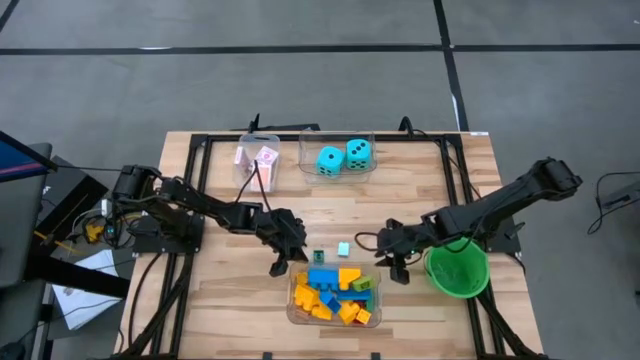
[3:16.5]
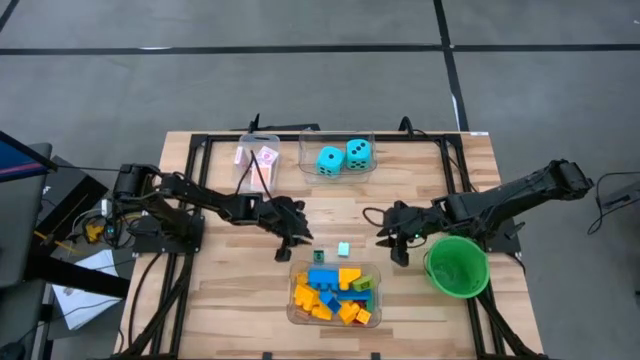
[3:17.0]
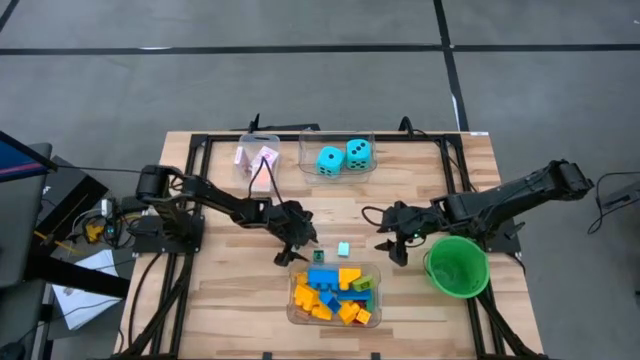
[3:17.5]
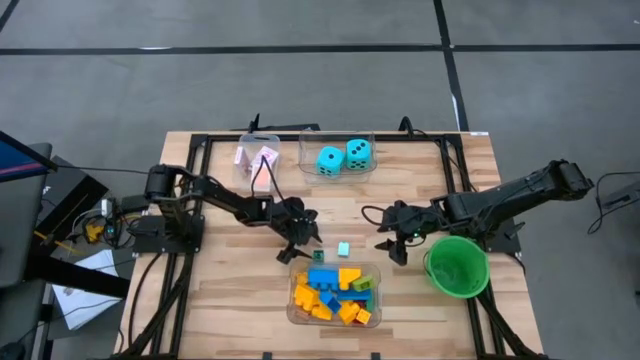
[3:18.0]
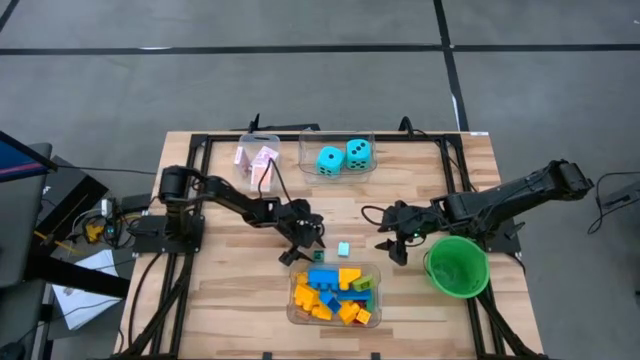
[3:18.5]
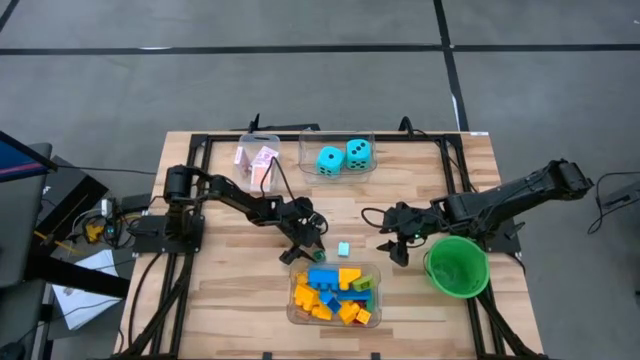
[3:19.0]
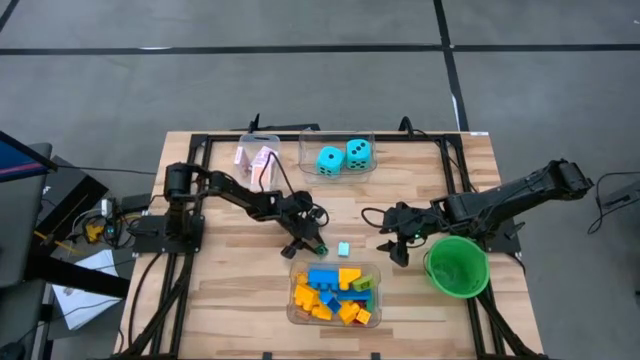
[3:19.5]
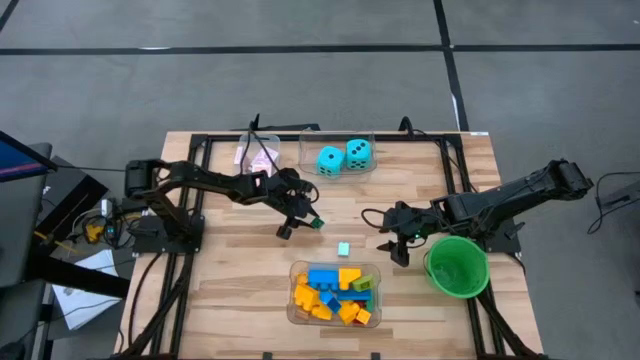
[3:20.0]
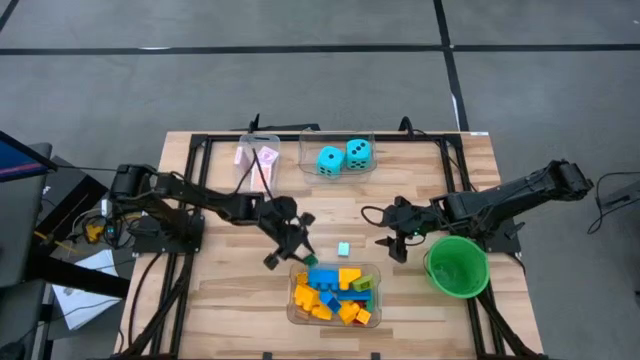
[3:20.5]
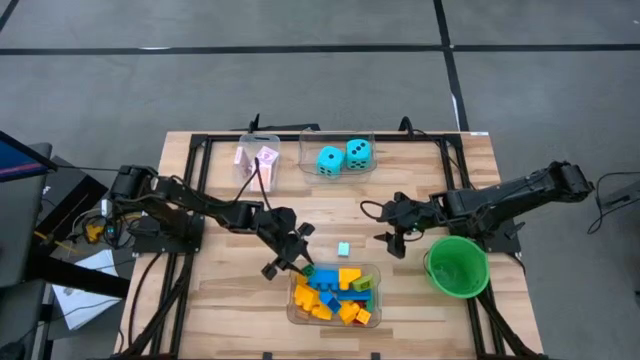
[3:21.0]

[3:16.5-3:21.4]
Task: Pick & Place Toys
Put the green game piece into the bottom transparent bin

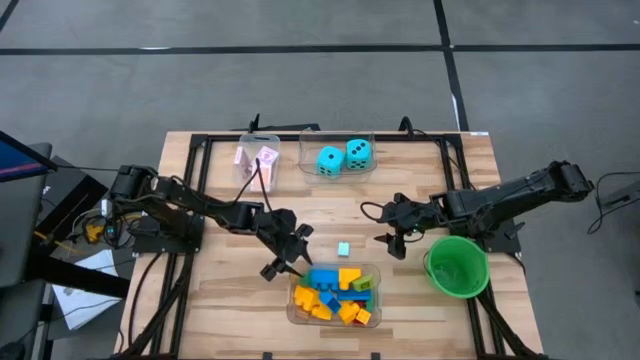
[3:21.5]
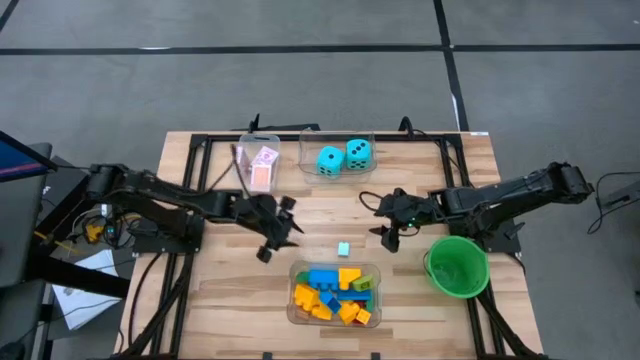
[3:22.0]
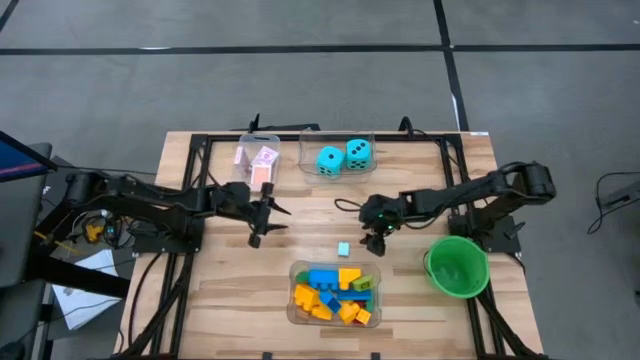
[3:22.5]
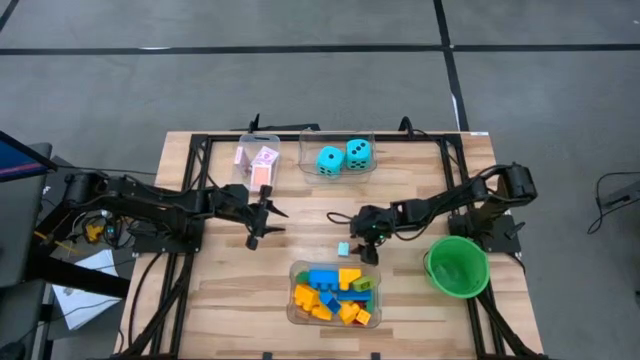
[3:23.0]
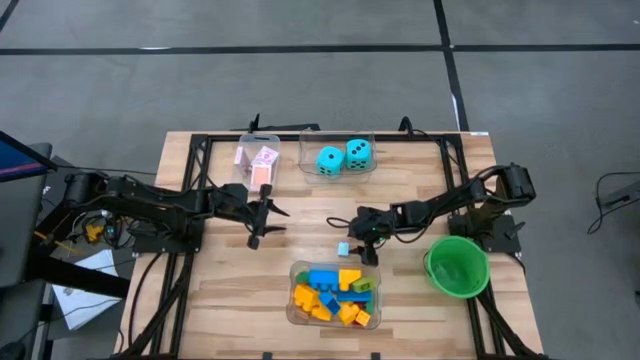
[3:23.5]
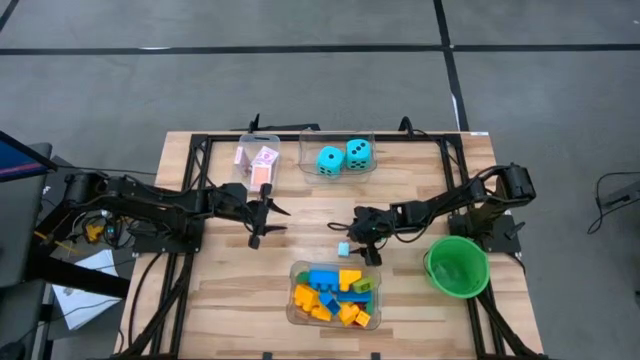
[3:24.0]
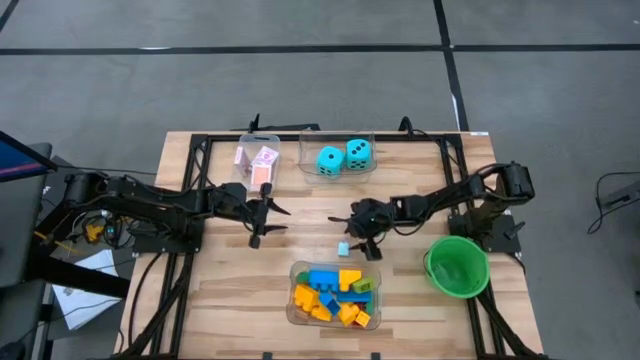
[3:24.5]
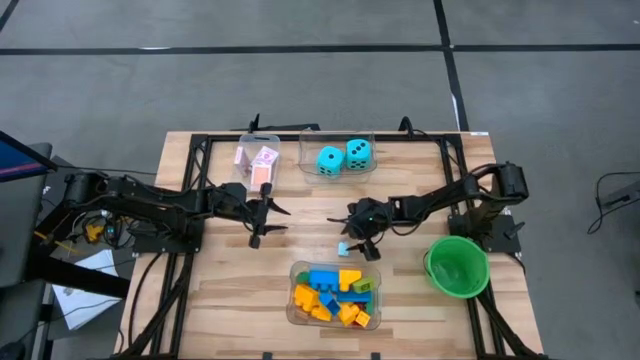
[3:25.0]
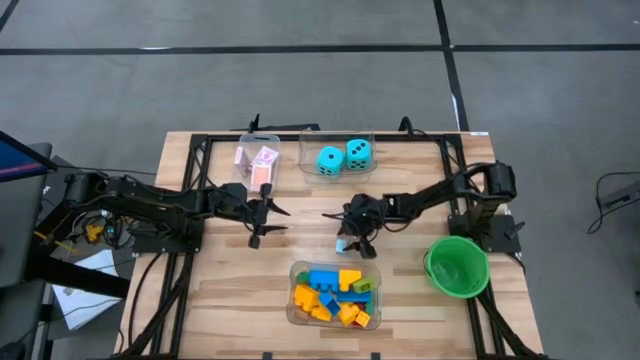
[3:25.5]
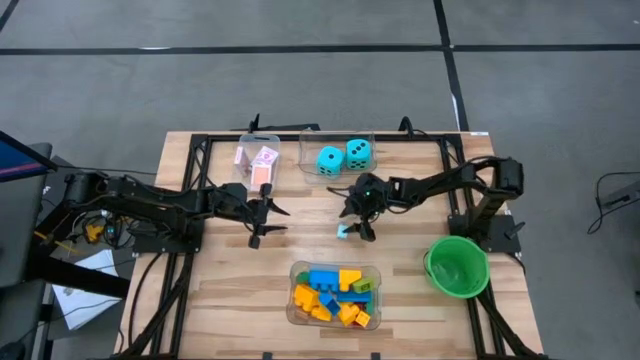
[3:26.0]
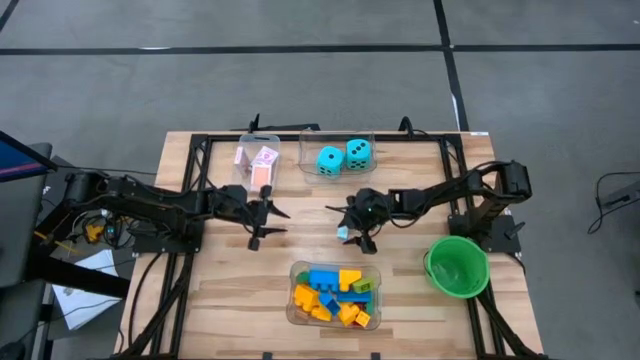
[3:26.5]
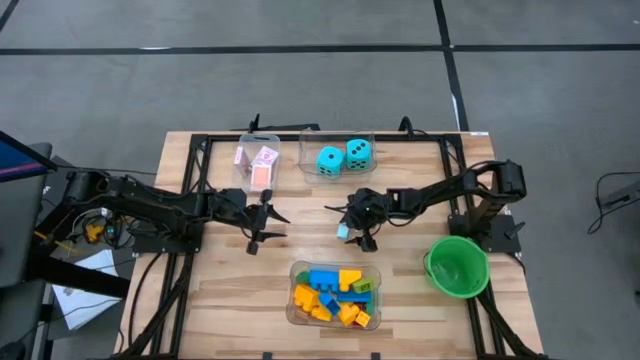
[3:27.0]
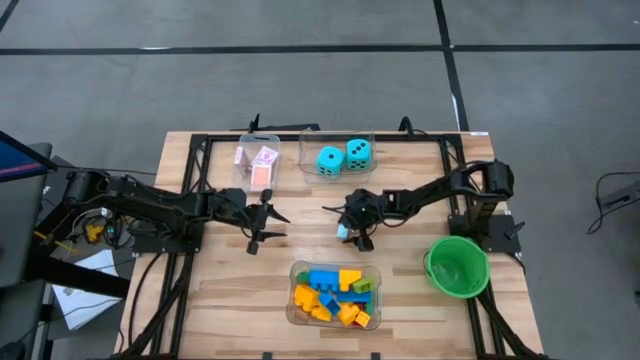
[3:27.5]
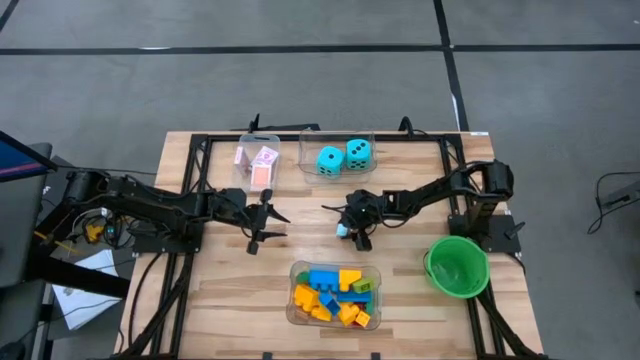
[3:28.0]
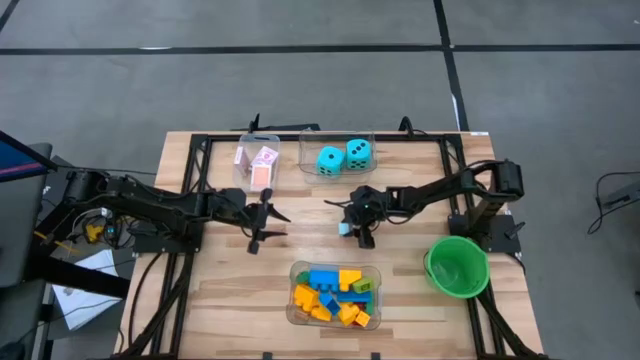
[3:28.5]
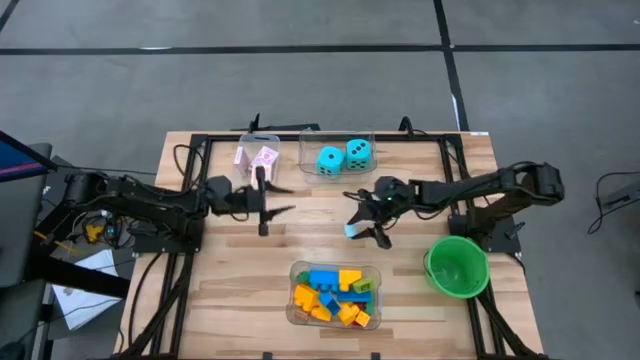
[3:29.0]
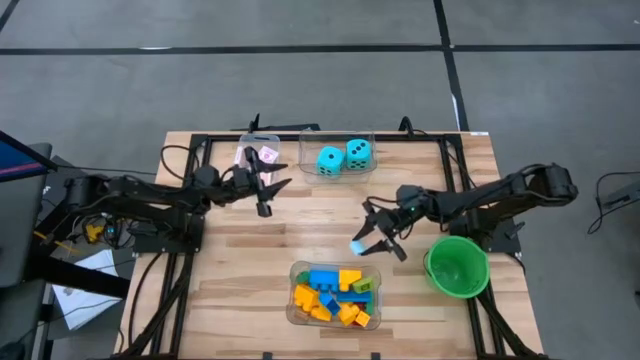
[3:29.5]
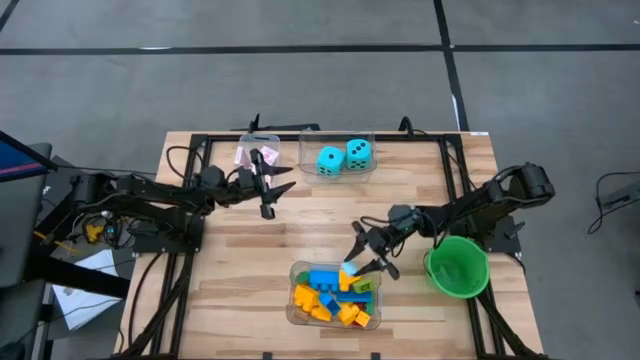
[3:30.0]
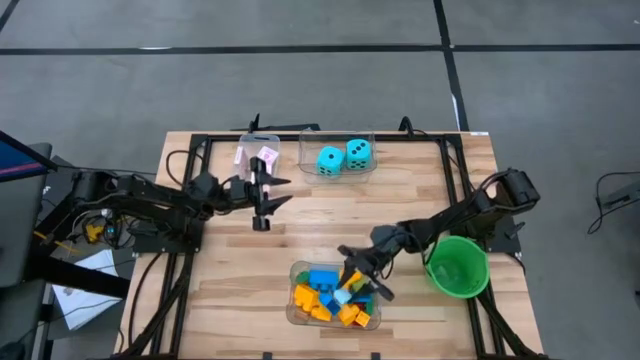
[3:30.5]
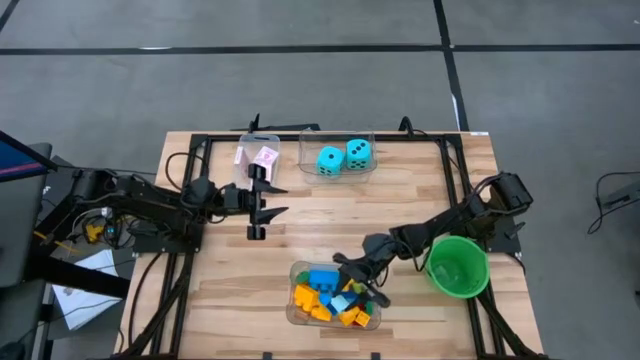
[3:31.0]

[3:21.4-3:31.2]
Put the light blue game piece into the bottom transparent bin

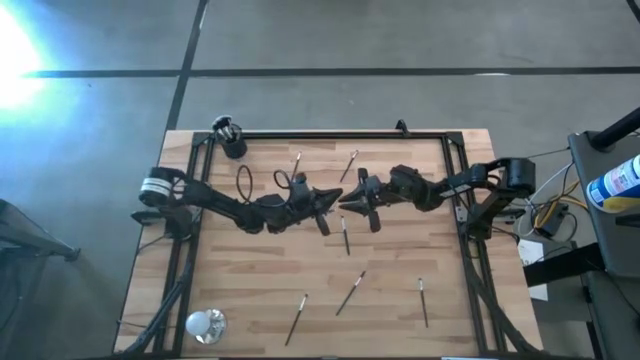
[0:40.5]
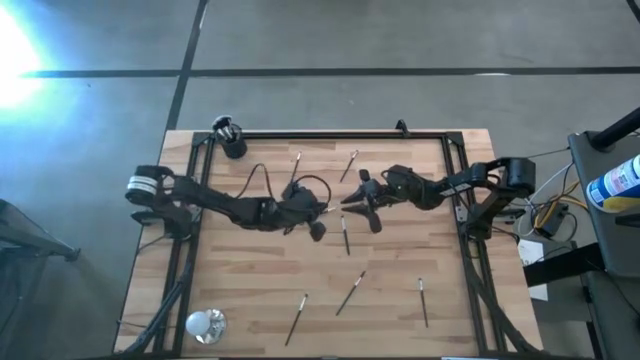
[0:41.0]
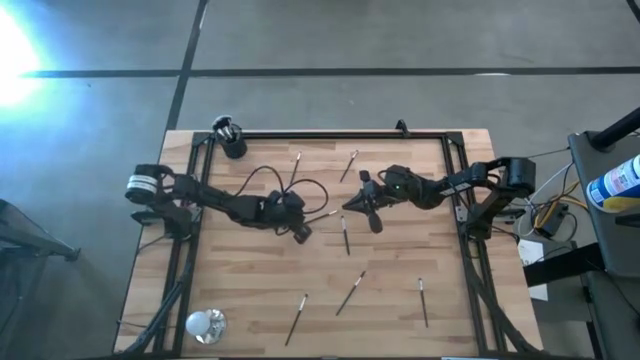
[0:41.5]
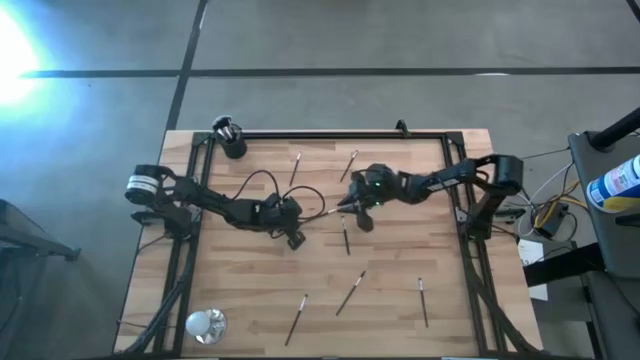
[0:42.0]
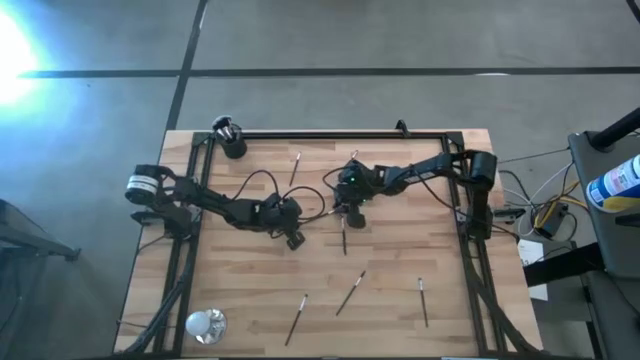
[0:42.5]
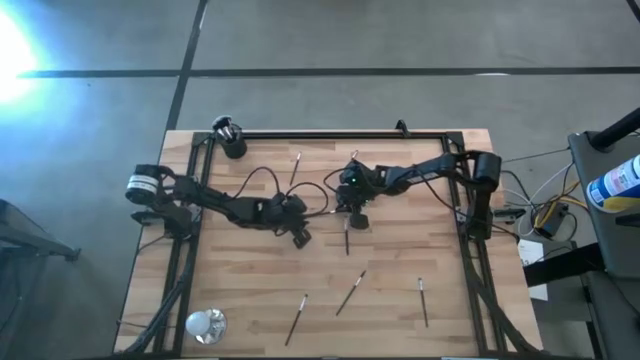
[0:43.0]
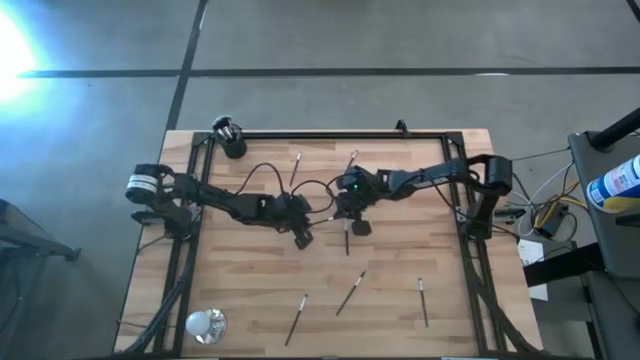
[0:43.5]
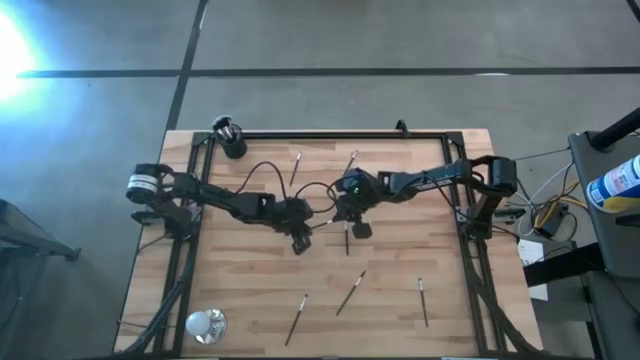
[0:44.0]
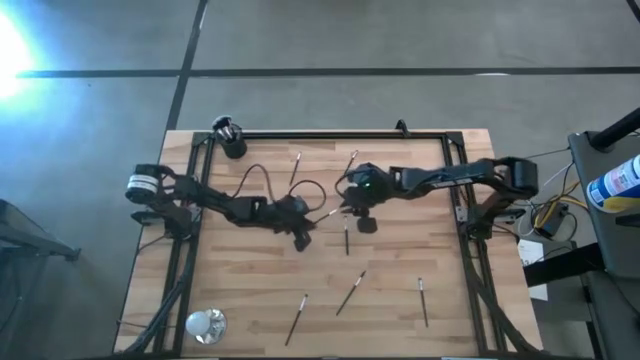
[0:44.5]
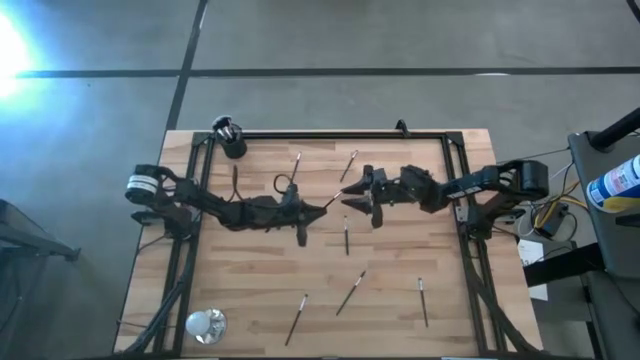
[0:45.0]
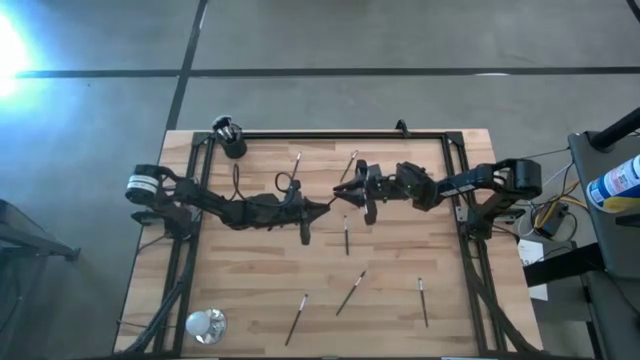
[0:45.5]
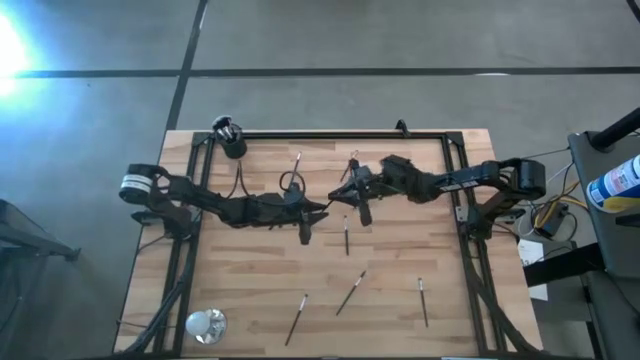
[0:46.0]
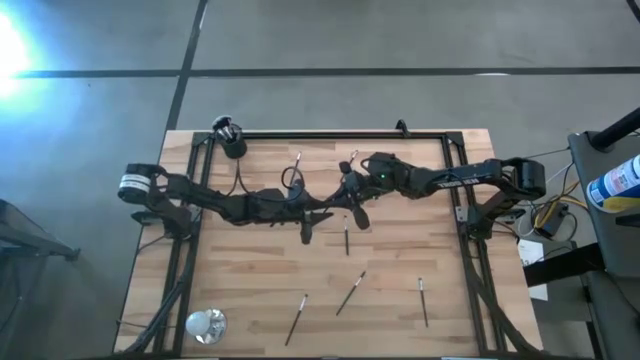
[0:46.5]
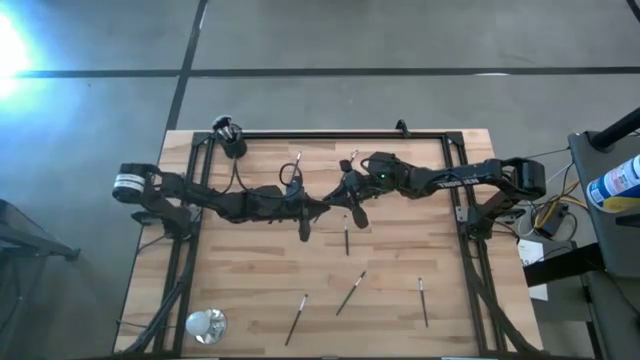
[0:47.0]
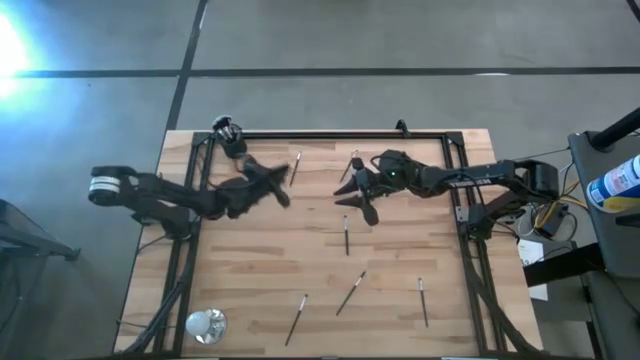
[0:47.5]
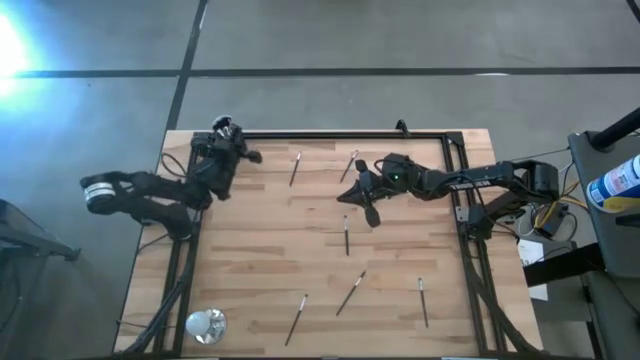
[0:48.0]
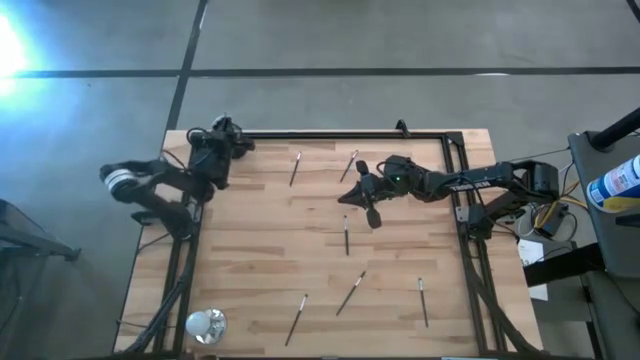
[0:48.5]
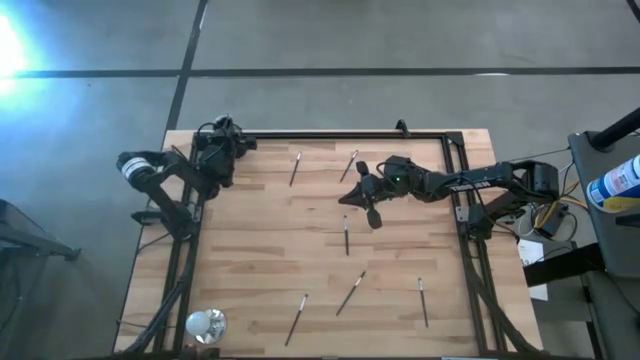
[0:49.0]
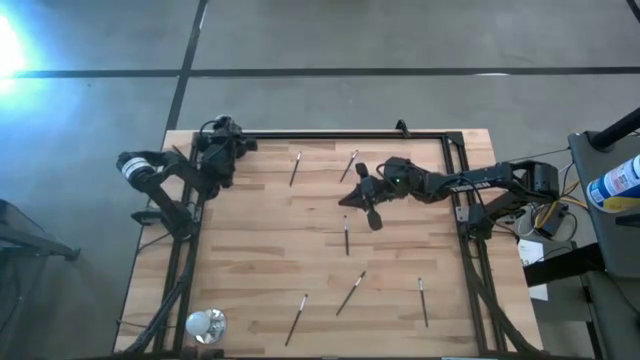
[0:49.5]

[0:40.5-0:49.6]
Task: Put items in baskets/containers
Put the black liner brush into the black pen holder
